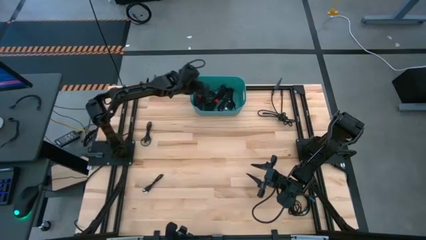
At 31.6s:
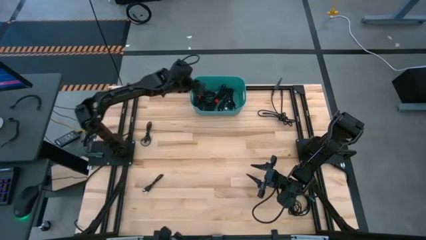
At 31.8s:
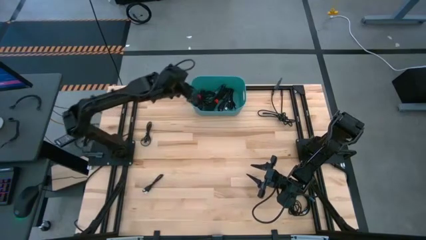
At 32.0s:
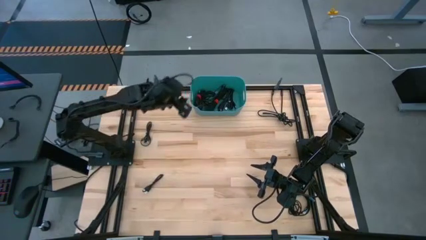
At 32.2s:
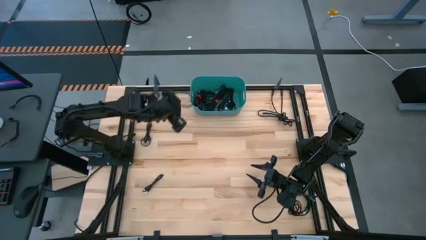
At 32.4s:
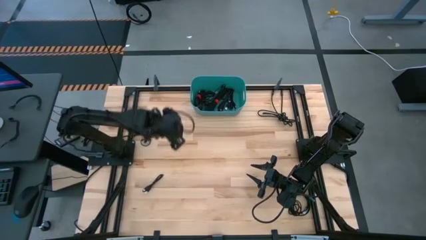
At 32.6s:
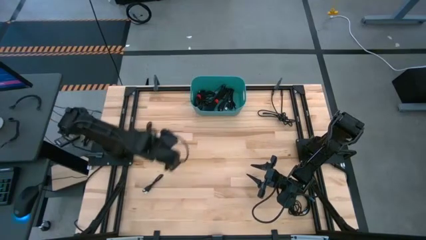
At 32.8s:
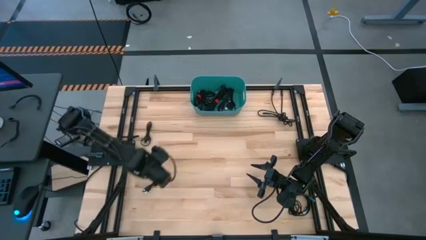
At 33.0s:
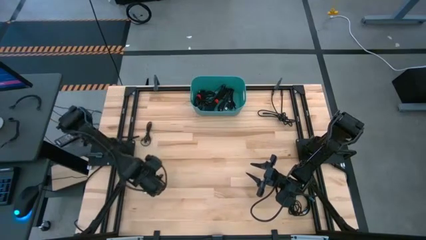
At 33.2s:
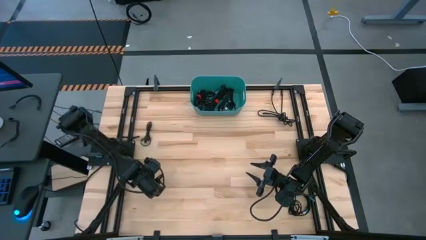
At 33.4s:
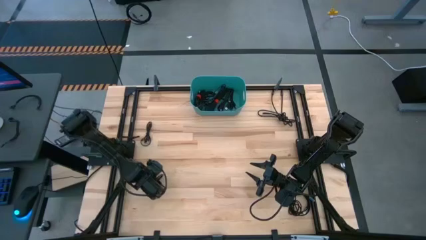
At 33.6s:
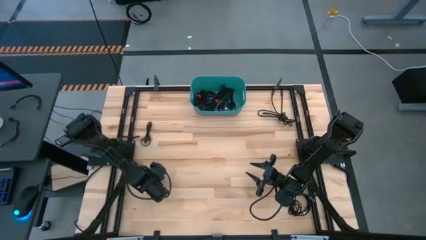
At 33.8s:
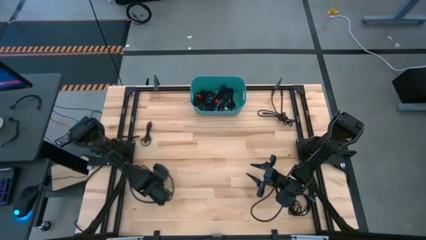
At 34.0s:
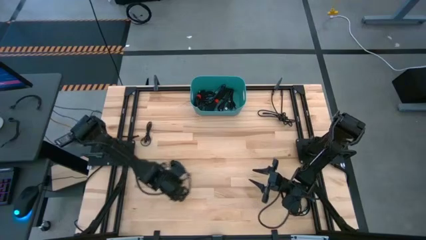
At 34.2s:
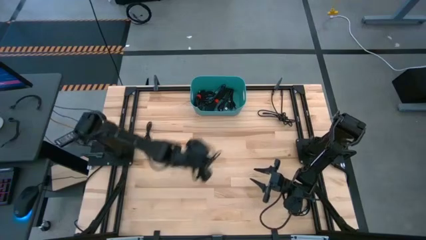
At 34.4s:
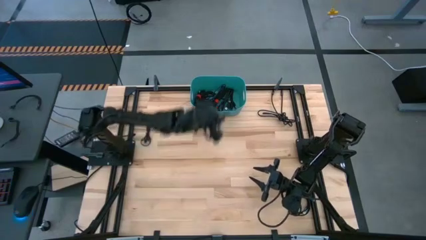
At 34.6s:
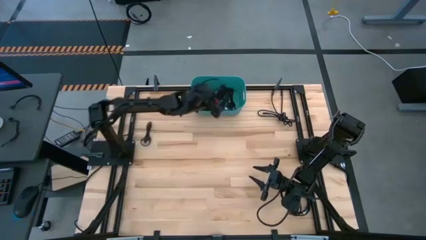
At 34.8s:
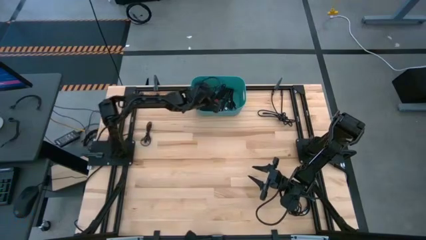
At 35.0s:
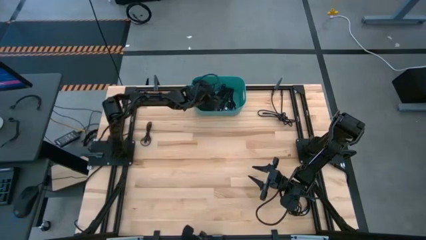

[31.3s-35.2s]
Task: Pick and place USB-C Cables
Put the black charger cable into the blue bin

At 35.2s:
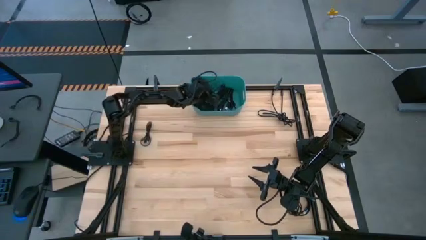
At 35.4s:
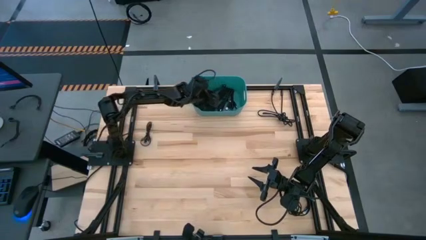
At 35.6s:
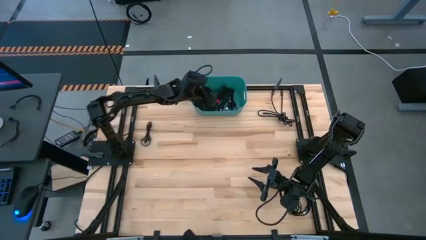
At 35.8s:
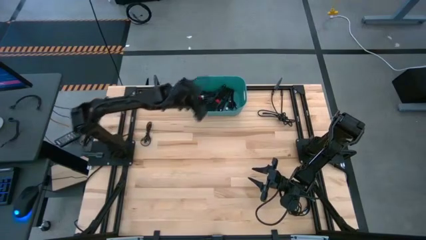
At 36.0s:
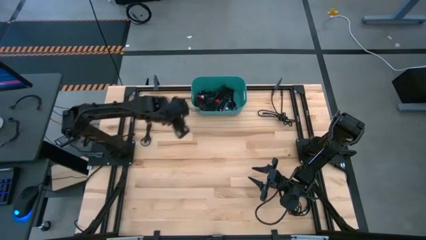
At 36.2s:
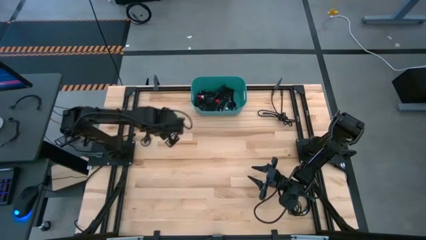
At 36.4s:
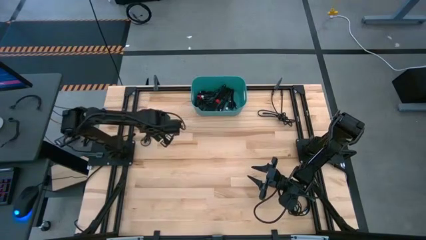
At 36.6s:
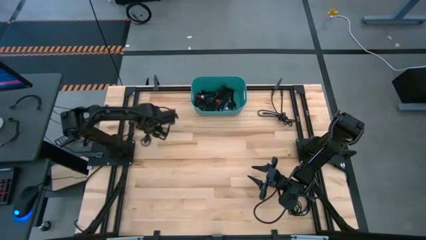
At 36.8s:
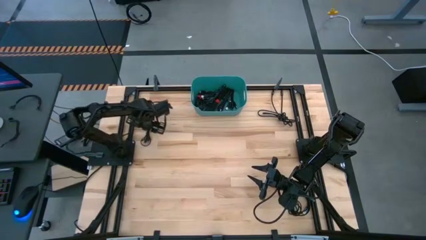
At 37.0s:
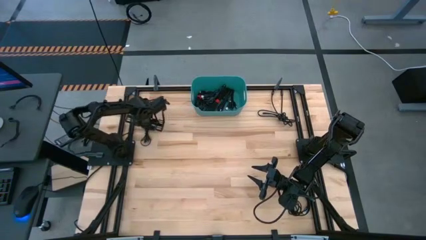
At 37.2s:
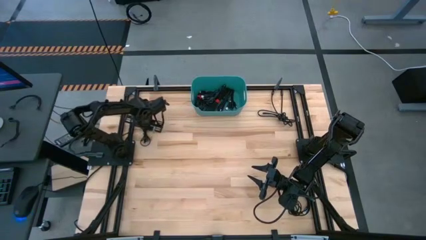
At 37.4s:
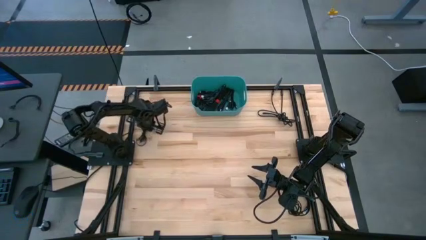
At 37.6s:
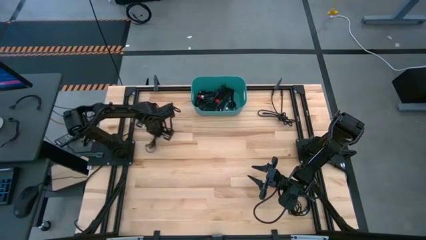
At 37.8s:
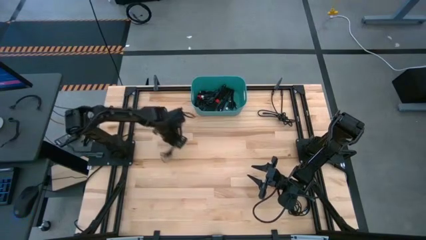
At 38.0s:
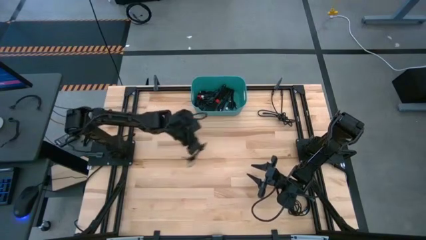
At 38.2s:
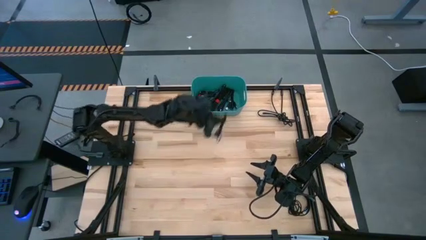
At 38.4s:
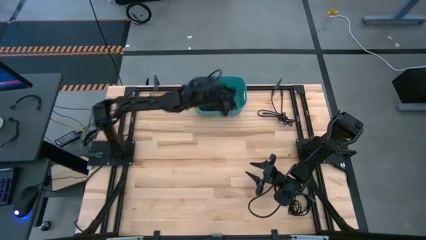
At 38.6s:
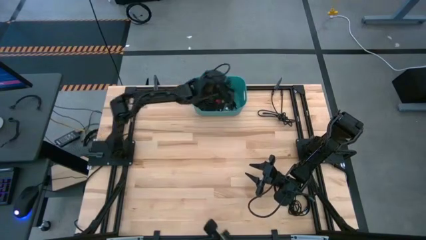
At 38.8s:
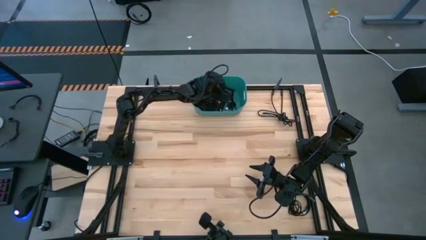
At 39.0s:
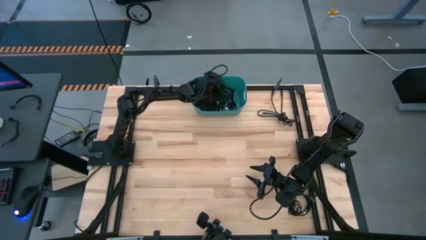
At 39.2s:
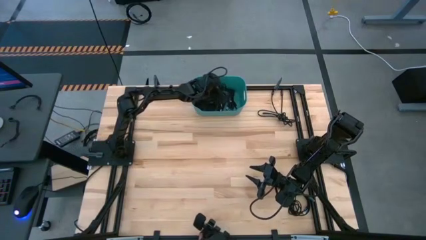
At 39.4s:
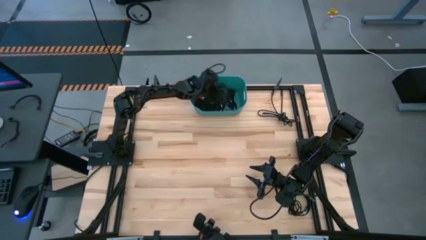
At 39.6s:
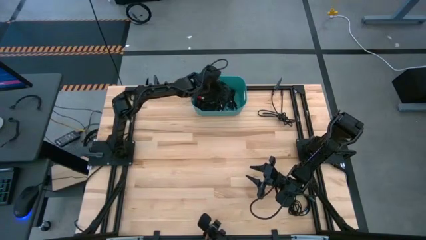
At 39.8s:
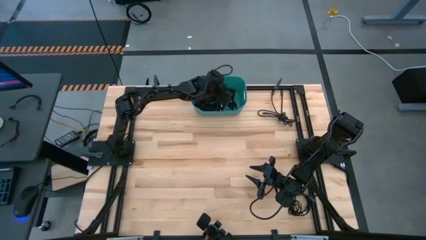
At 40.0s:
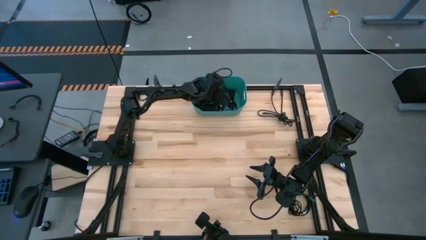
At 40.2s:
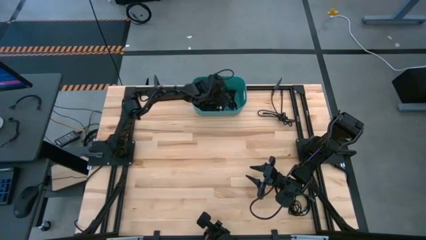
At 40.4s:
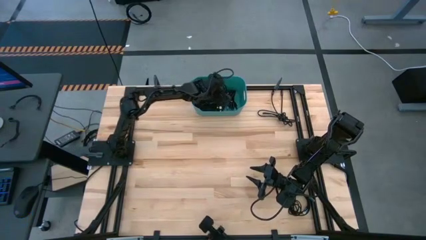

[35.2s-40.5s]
Put the top left black charger cable into the blue bin

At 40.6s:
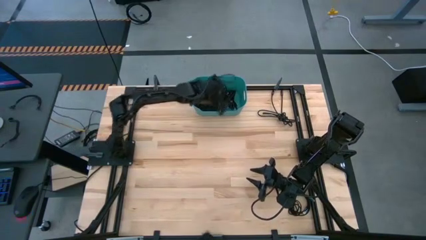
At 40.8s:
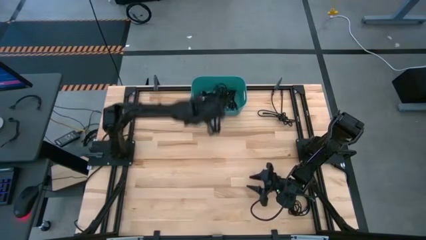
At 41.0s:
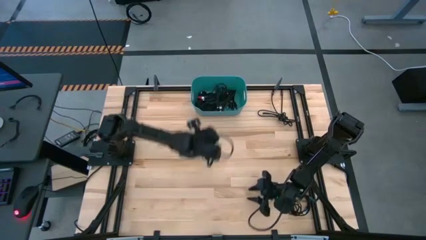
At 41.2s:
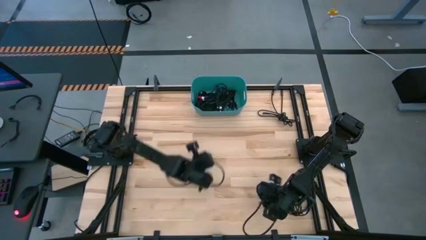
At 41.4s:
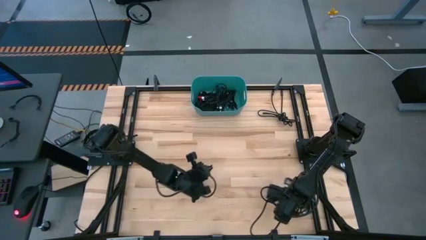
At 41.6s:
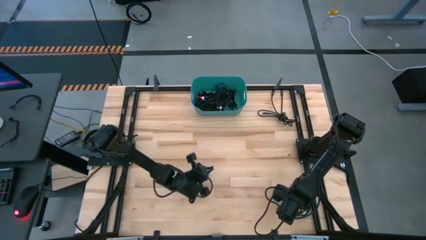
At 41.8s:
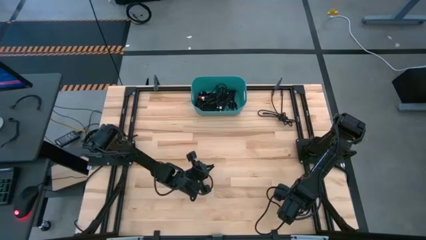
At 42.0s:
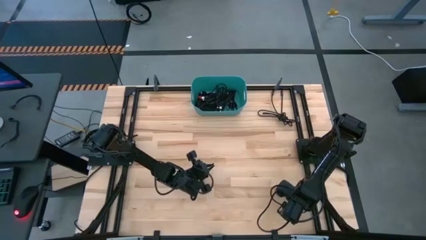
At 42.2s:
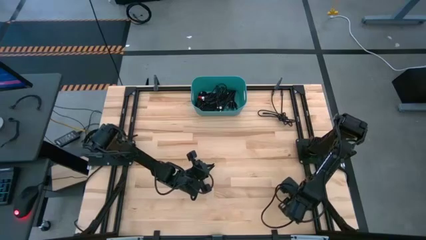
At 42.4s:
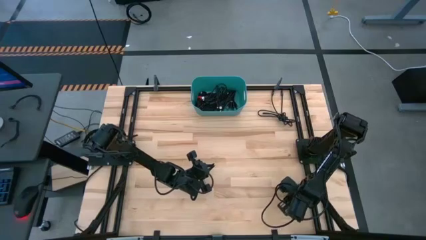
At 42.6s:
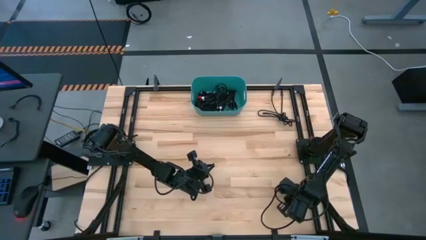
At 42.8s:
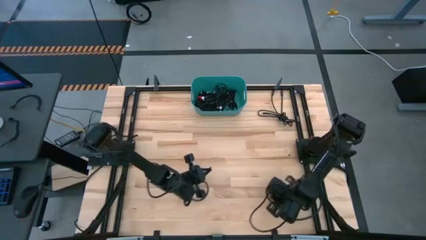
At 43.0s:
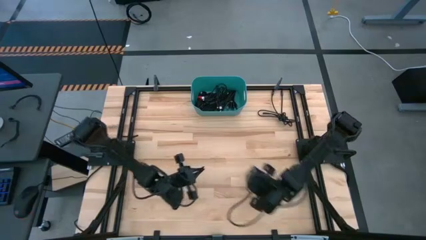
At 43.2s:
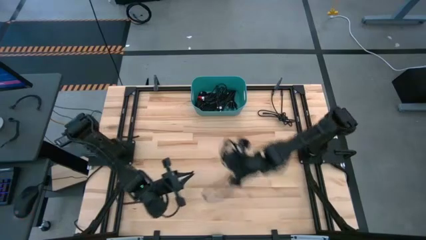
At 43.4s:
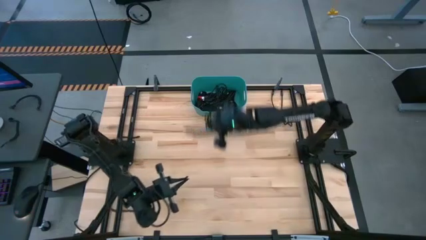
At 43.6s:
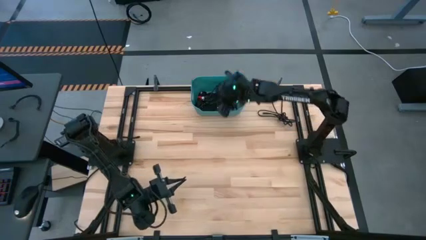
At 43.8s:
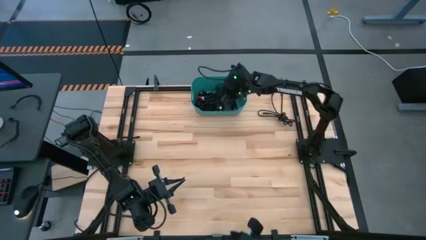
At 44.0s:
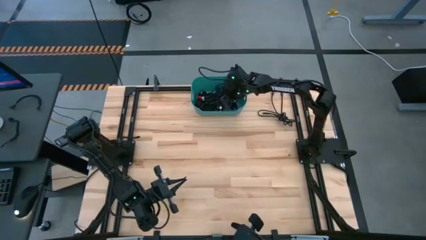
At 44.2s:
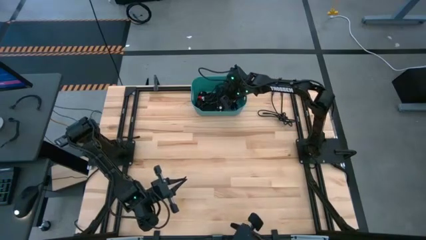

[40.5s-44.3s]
Put the bottom black charger cable into the blue bin

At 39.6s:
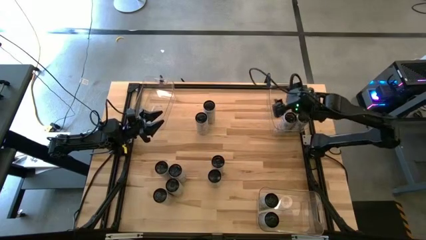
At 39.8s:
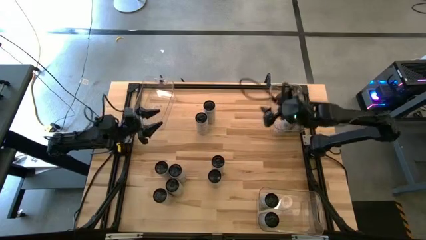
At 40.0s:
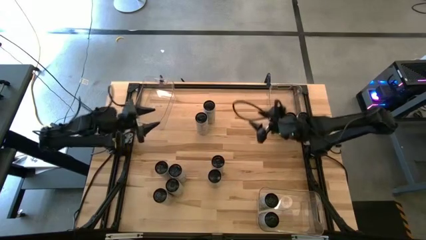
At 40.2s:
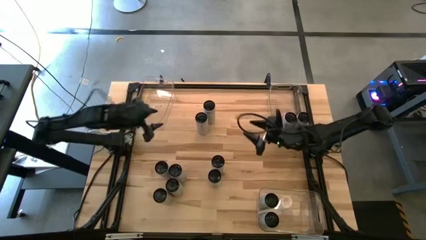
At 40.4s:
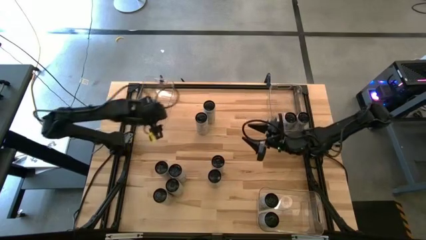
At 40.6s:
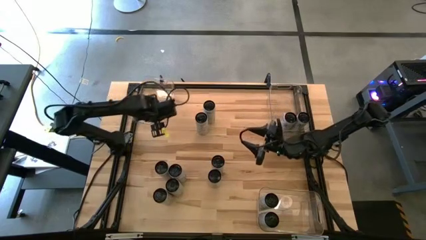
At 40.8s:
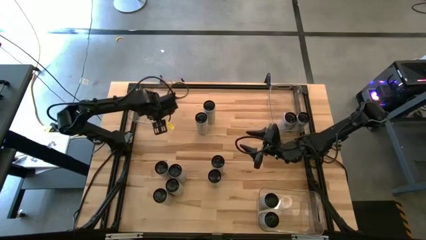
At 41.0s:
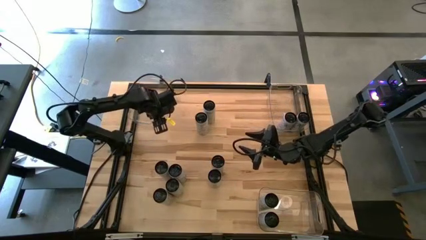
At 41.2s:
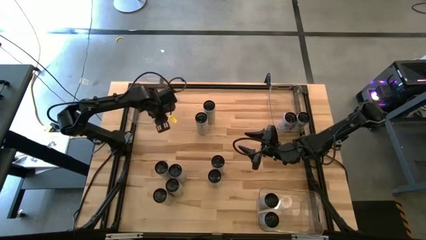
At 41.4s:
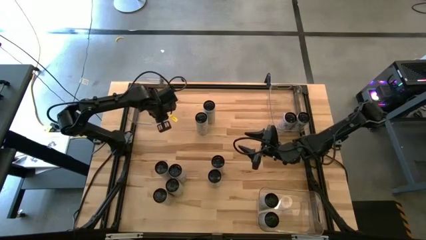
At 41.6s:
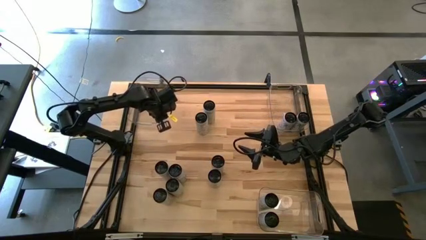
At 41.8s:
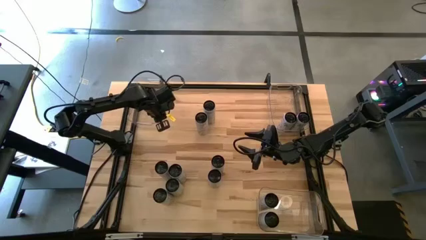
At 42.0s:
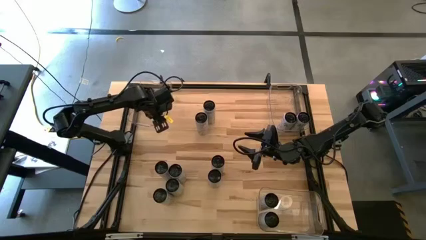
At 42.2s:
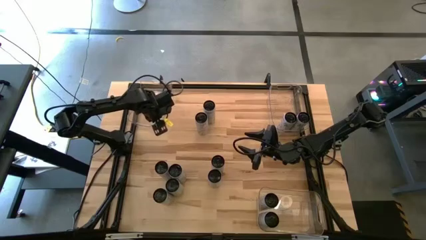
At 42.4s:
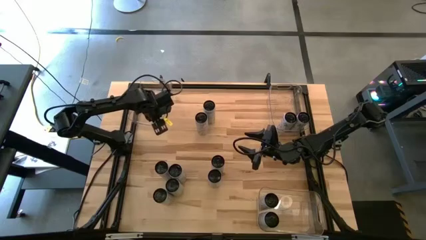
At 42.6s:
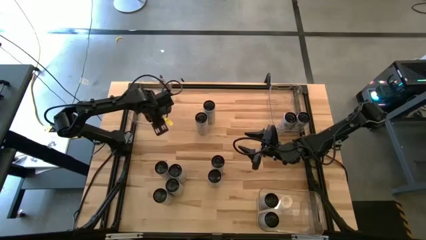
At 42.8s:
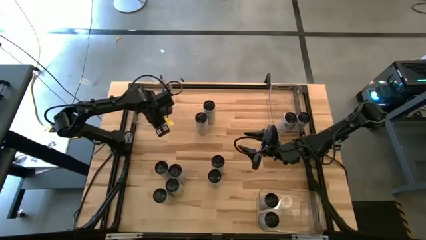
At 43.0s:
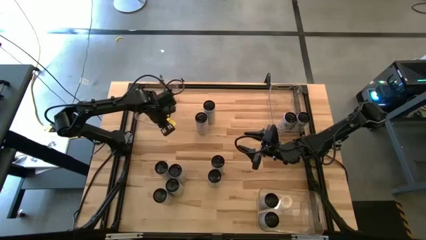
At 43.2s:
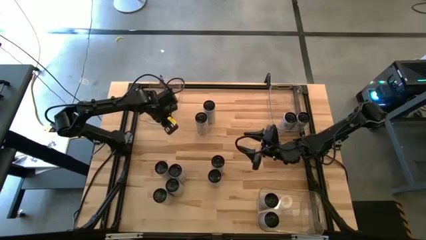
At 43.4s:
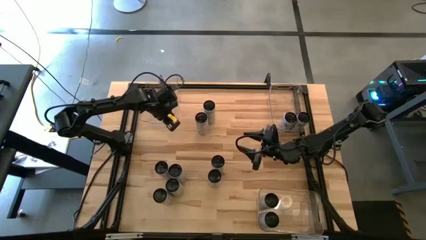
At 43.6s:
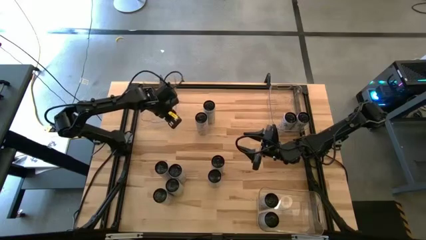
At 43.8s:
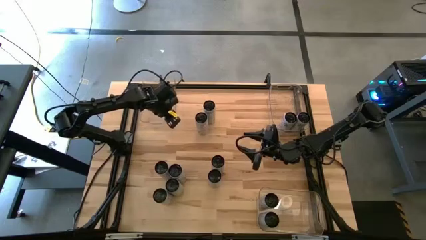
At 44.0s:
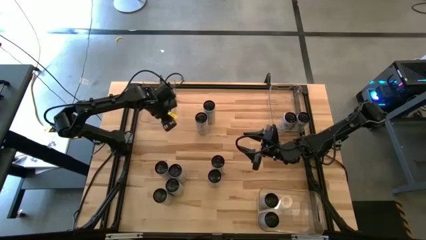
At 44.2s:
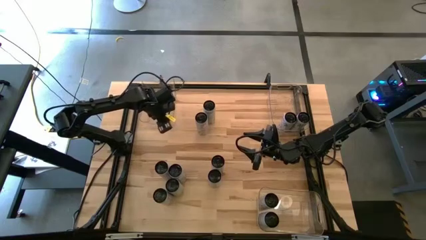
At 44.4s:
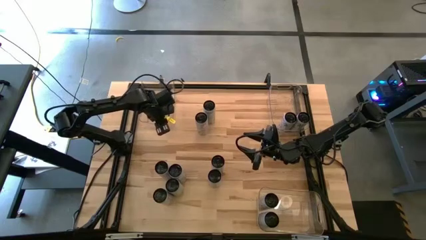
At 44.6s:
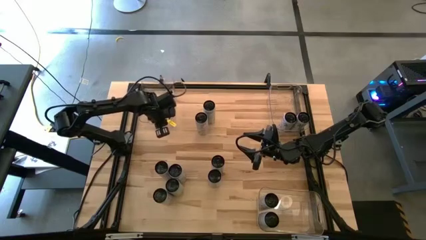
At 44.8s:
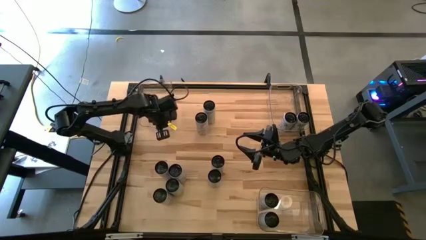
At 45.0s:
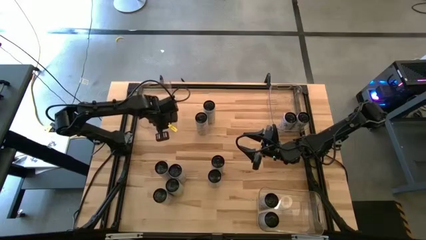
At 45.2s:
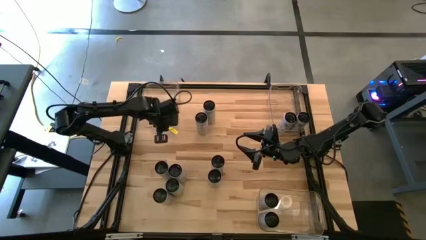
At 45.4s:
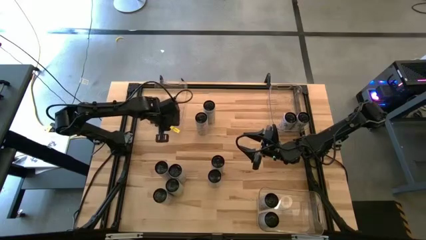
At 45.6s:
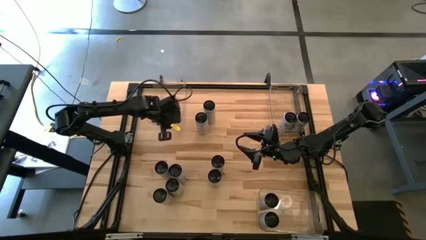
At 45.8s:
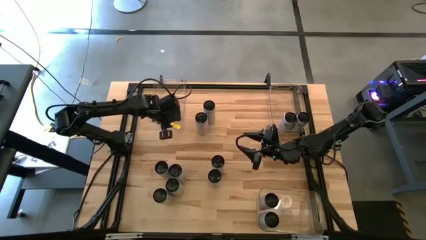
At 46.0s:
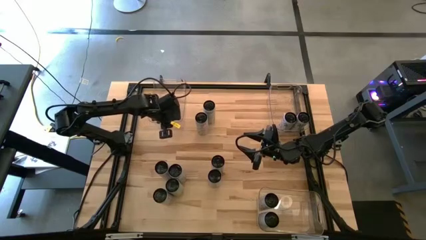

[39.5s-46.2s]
Task: Sort soda cans
Adjust the top left transparent bin
